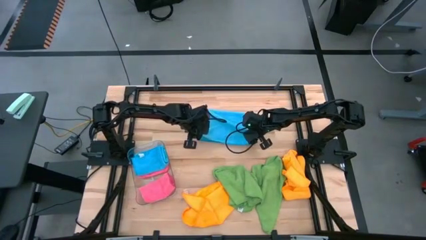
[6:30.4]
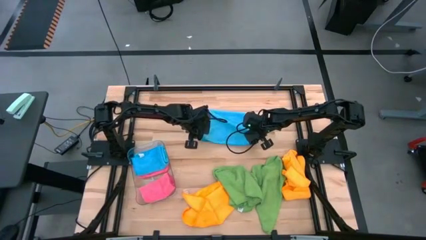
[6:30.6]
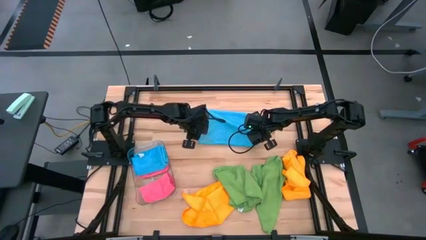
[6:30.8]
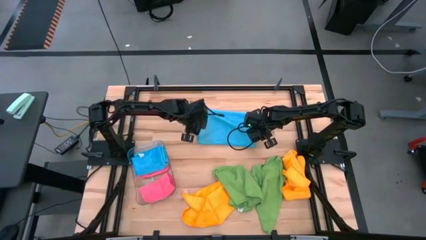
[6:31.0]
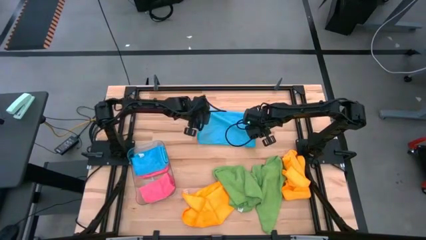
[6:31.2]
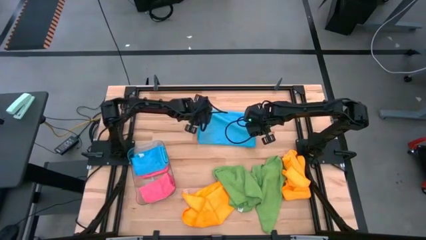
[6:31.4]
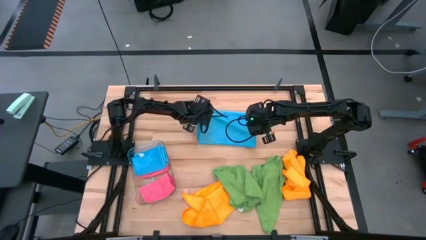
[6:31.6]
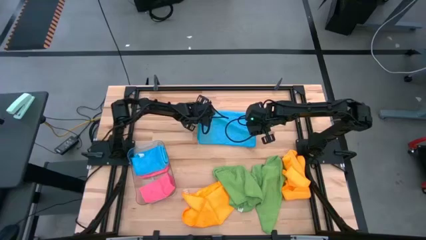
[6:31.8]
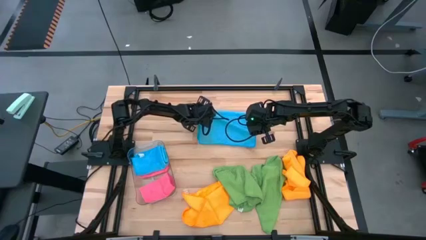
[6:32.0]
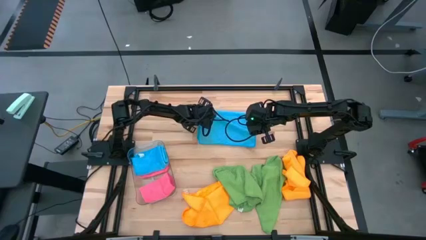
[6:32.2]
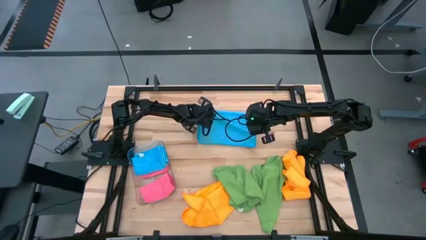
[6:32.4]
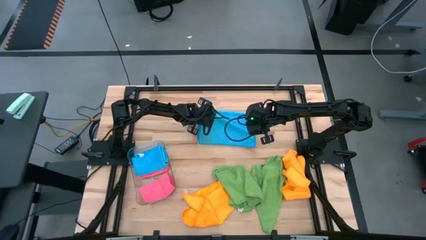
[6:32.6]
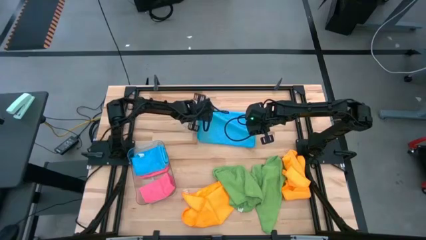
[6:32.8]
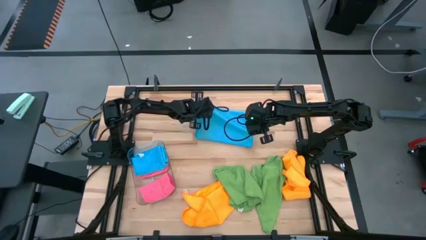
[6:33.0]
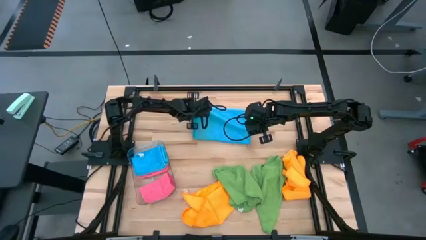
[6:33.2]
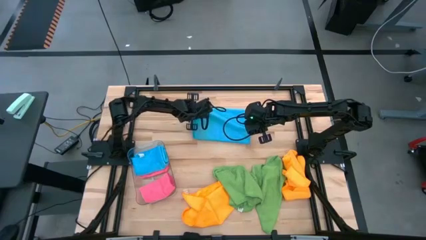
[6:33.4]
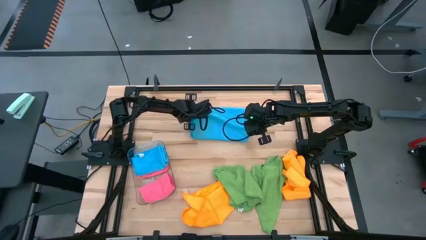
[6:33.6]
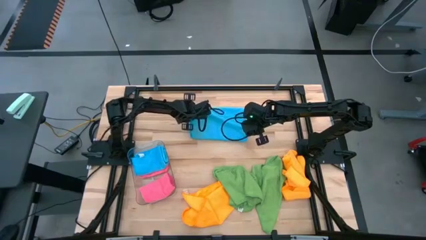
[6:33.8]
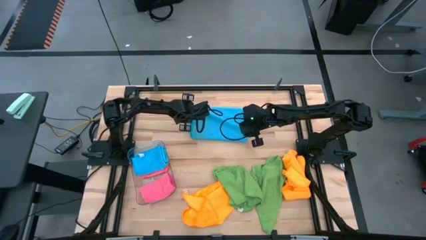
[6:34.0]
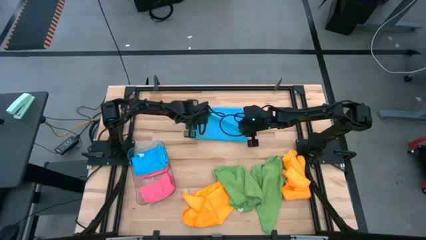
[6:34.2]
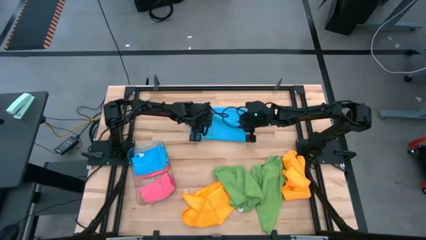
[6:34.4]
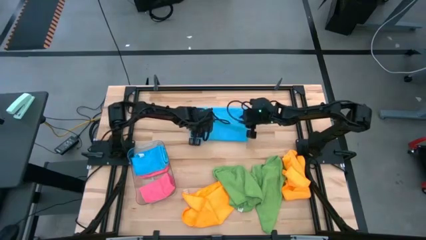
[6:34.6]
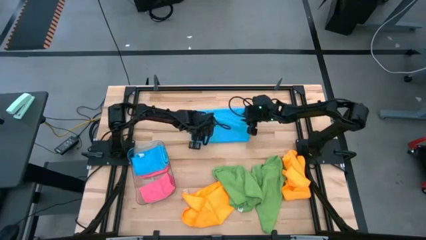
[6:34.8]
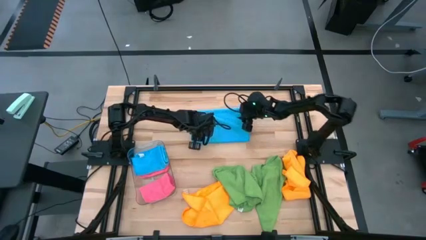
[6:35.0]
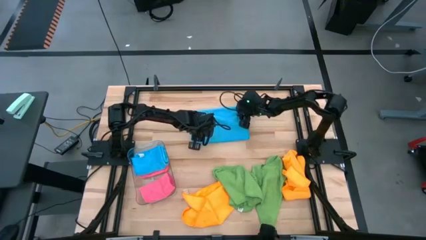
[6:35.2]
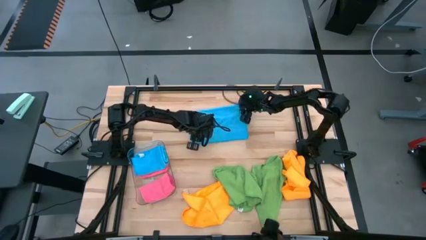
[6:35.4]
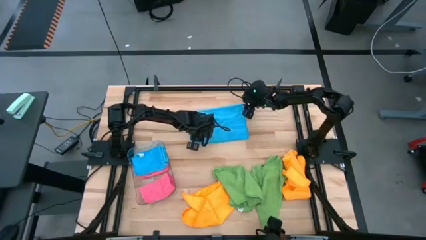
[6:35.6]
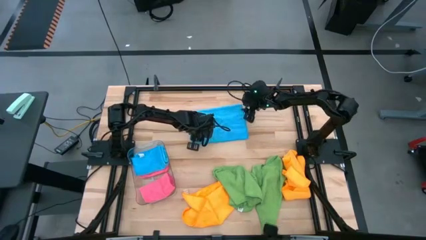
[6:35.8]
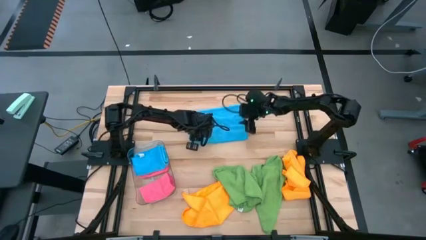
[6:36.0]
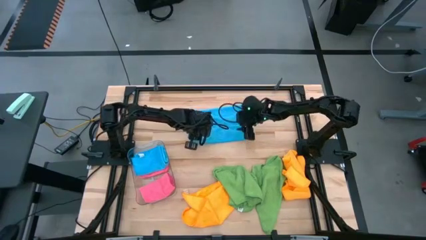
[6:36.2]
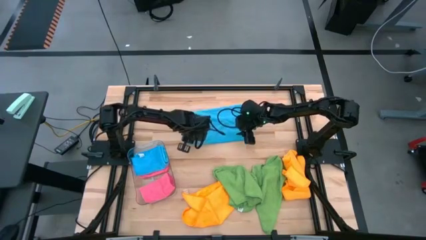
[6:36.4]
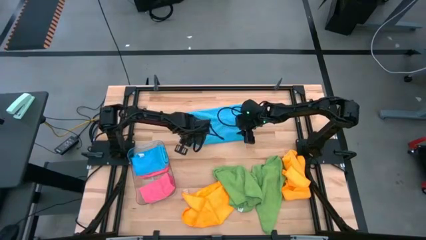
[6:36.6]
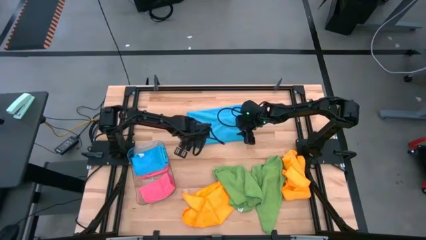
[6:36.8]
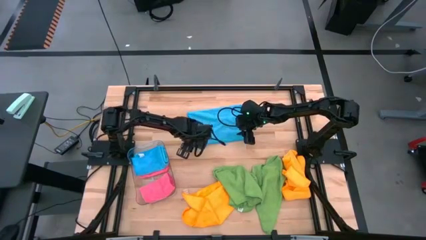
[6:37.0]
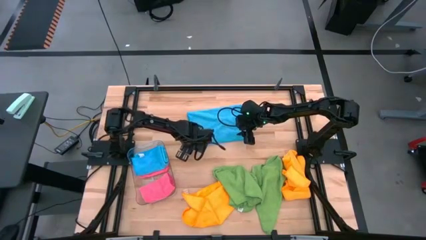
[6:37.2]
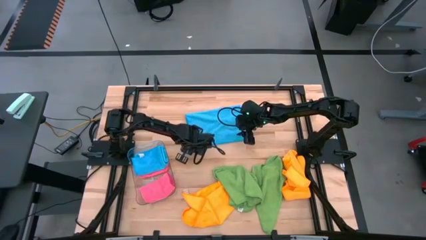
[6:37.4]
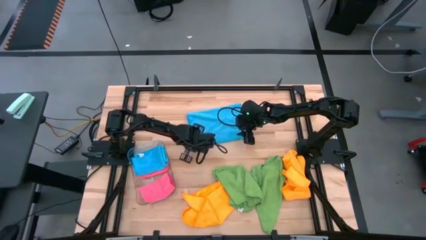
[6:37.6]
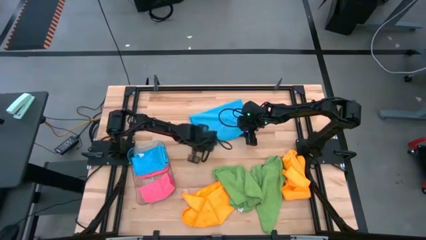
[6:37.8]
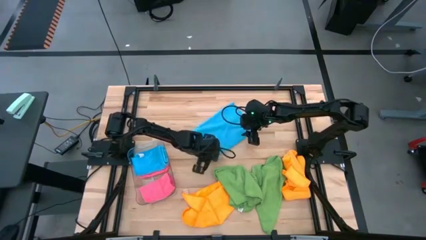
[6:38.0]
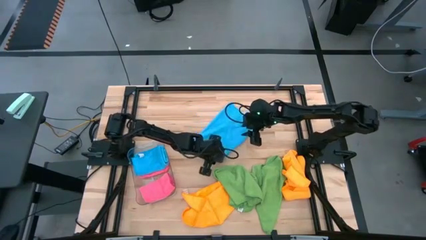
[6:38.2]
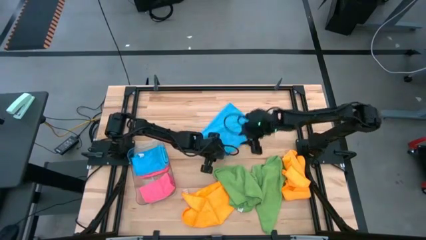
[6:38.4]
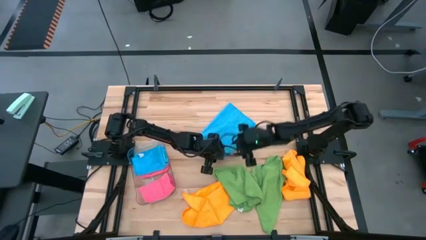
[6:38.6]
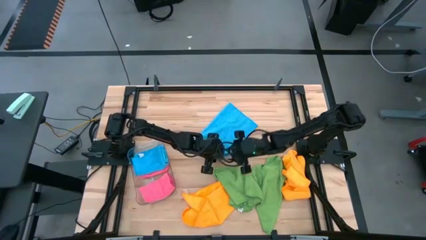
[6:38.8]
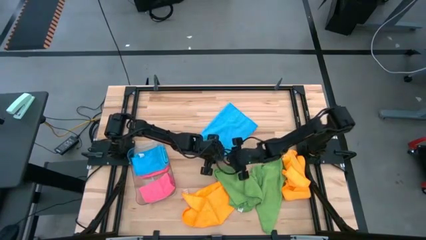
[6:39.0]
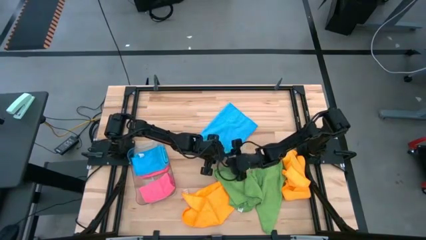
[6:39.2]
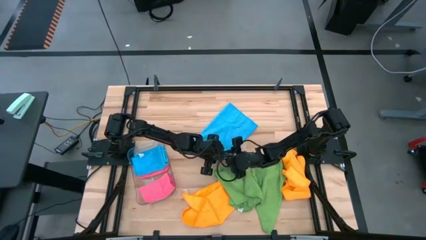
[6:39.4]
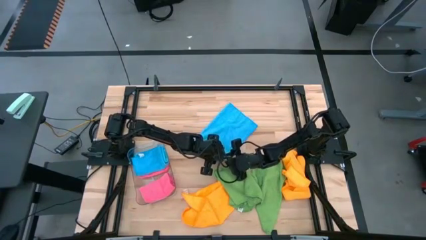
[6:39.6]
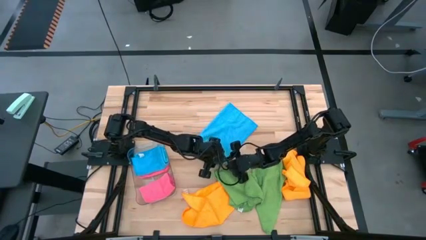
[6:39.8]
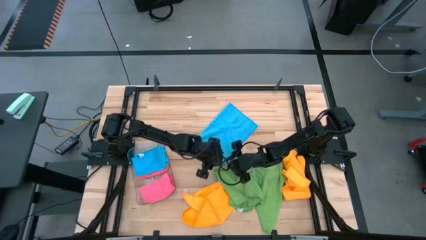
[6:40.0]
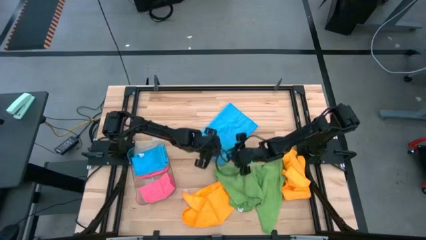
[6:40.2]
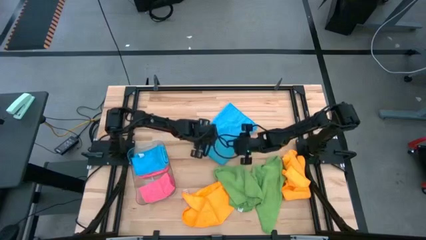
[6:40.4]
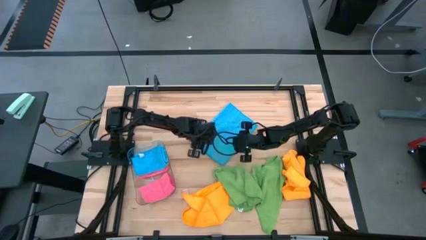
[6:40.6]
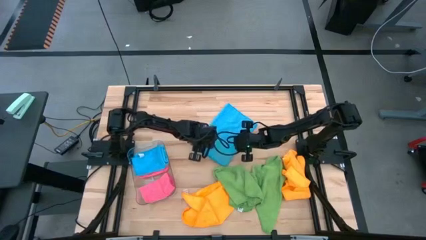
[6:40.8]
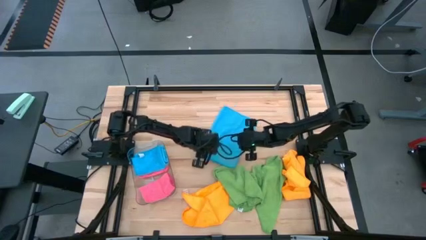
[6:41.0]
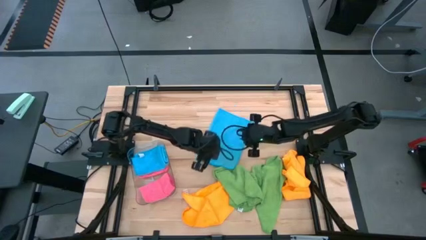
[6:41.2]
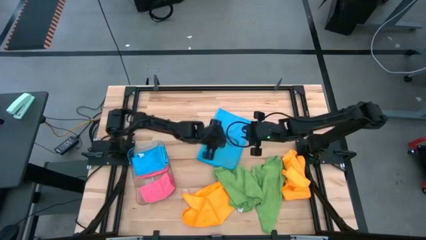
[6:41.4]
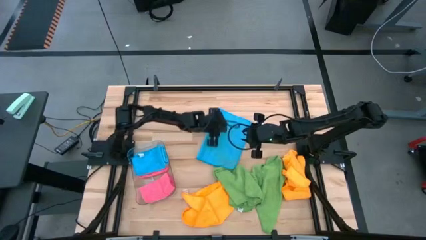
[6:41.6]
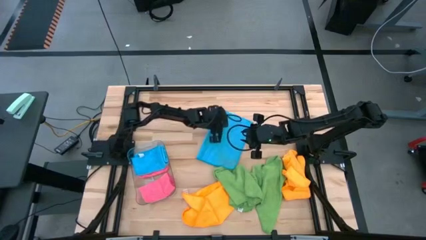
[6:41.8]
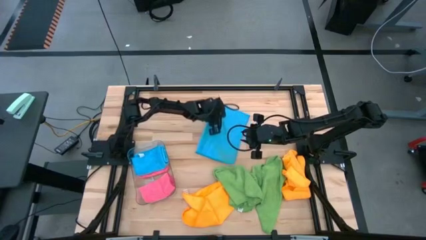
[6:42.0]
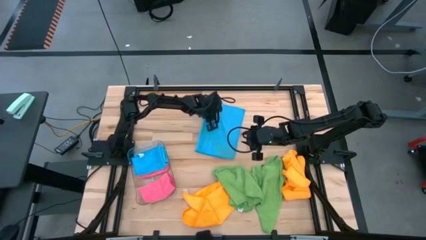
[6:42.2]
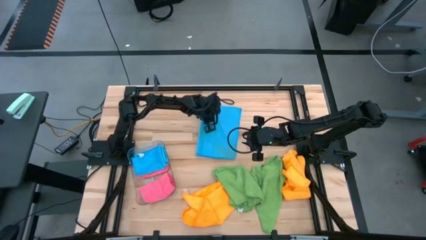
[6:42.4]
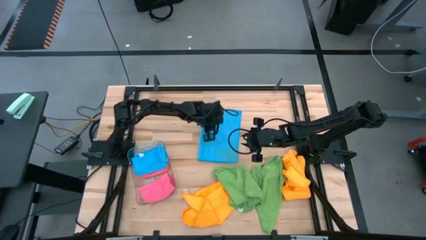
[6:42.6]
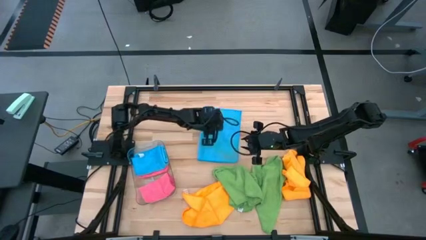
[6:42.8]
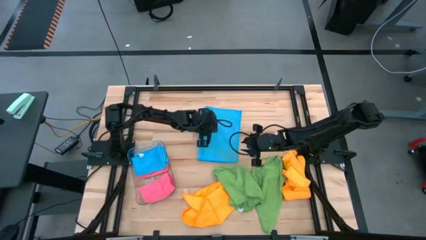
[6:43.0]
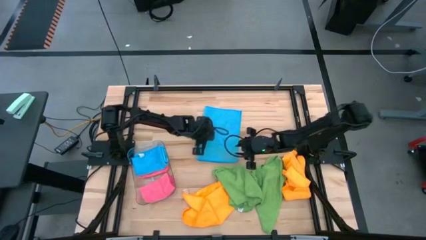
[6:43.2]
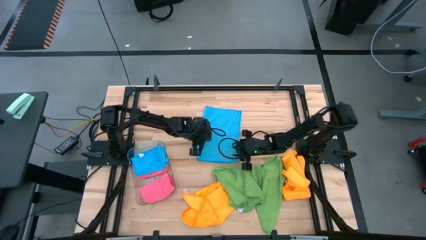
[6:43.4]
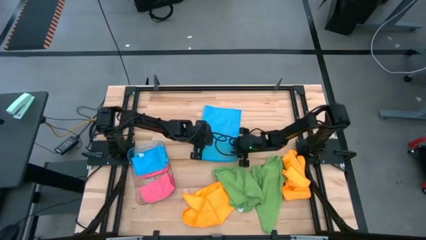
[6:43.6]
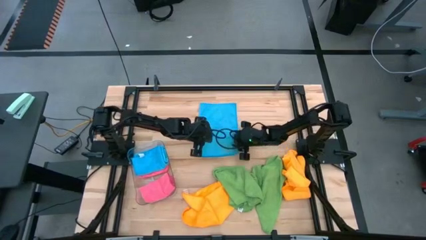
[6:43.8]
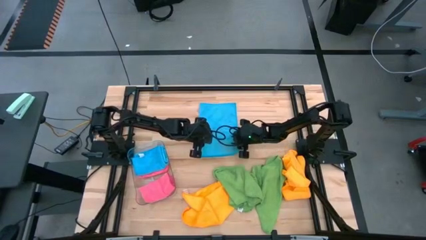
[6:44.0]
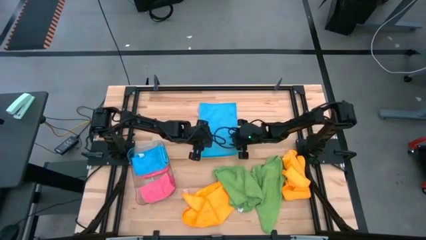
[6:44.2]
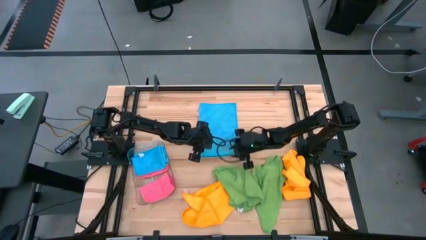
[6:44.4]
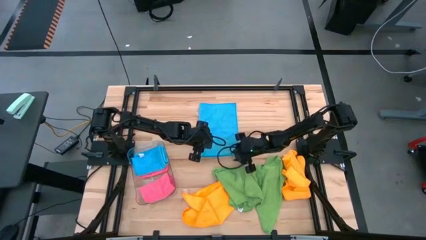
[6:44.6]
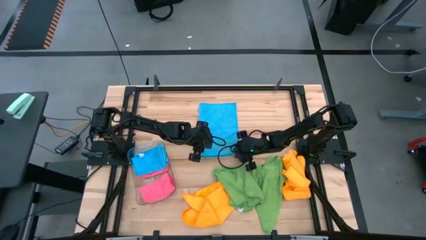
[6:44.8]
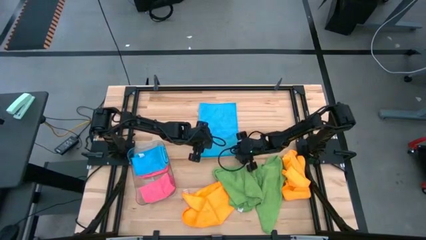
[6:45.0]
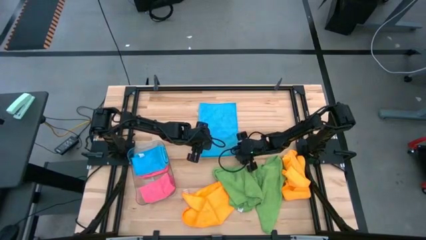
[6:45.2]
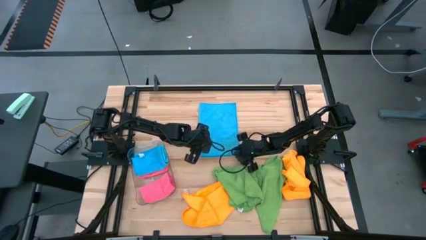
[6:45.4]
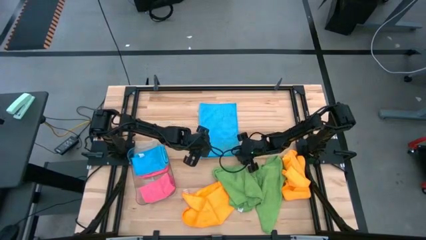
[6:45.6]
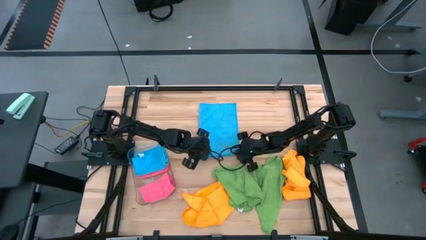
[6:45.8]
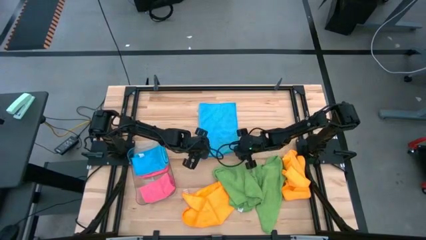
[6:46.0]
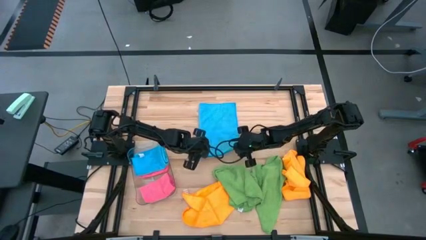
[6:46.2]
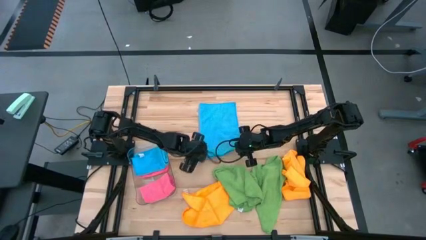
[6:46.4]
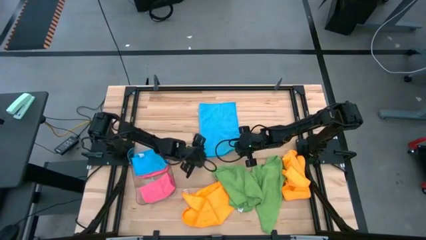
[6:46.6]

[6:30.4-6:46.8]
Task: Fold microfiber towels
Fold the blue microfiber cloth
